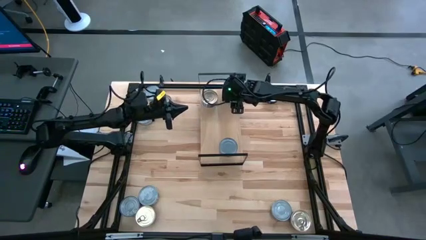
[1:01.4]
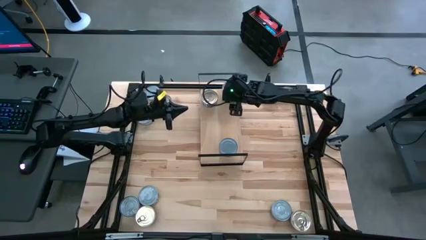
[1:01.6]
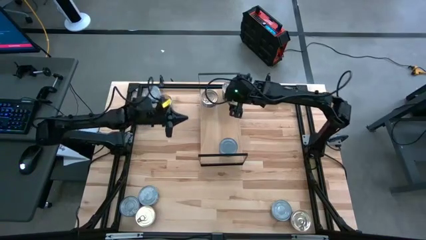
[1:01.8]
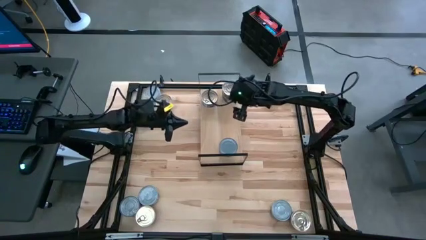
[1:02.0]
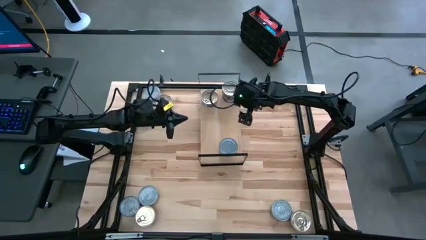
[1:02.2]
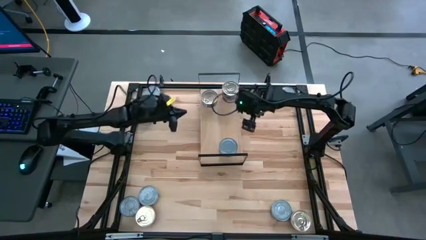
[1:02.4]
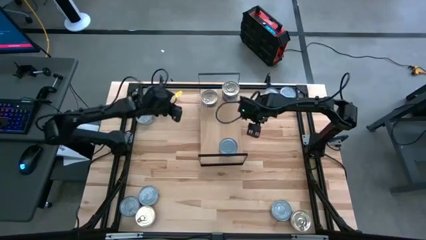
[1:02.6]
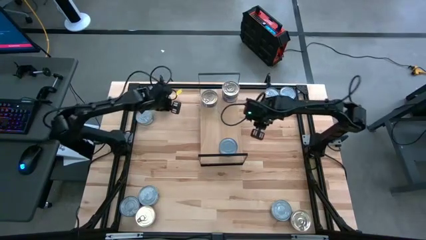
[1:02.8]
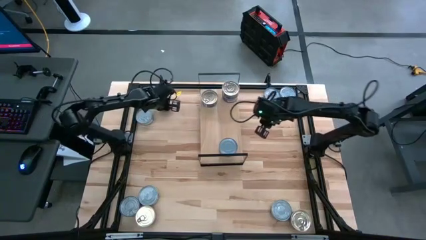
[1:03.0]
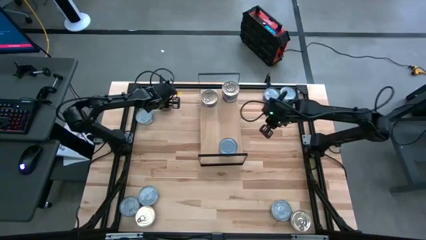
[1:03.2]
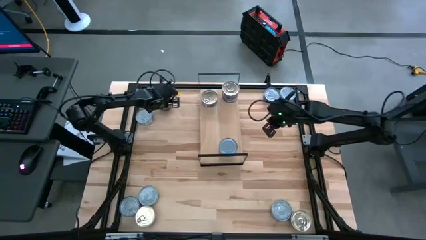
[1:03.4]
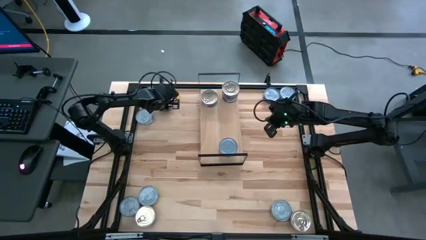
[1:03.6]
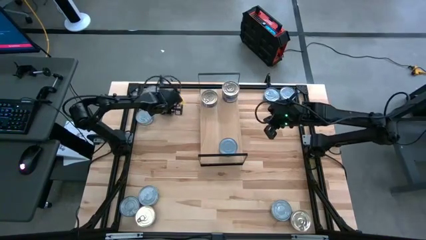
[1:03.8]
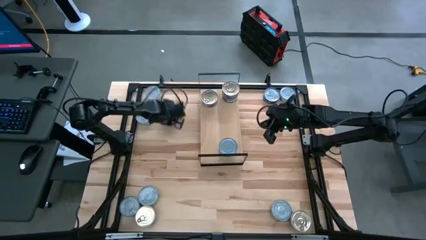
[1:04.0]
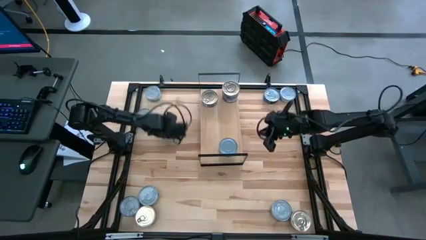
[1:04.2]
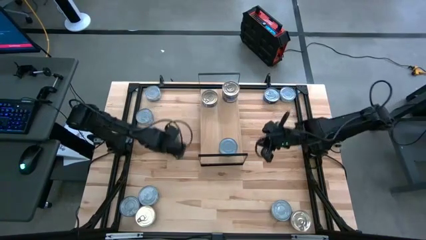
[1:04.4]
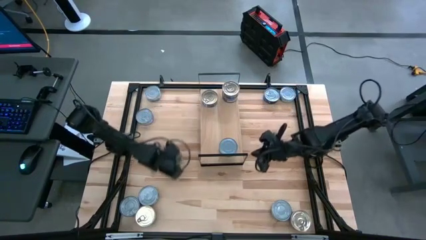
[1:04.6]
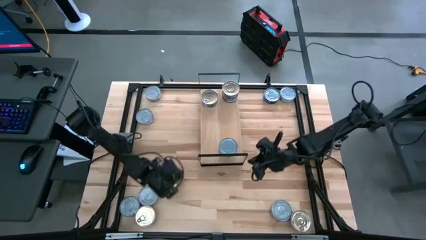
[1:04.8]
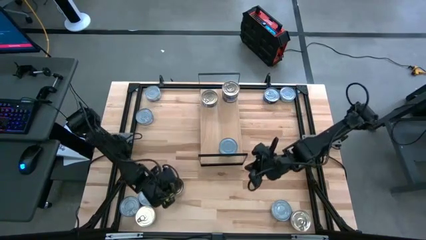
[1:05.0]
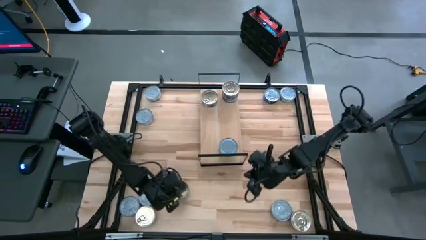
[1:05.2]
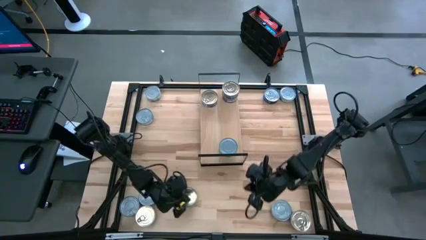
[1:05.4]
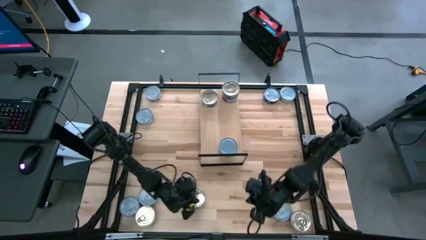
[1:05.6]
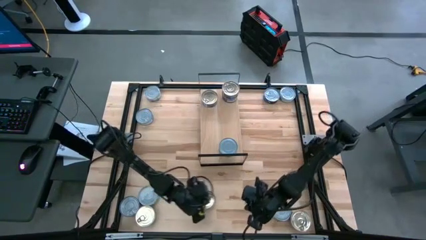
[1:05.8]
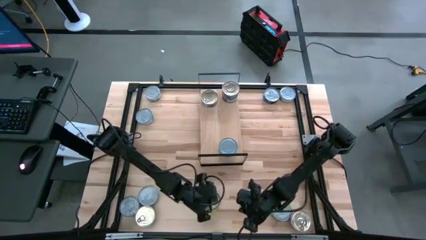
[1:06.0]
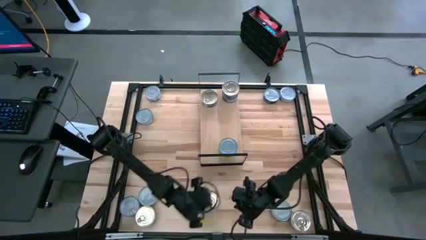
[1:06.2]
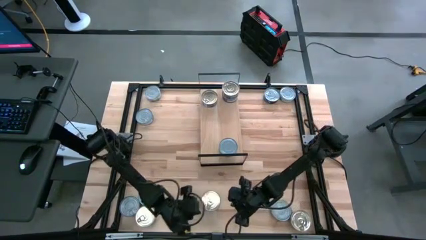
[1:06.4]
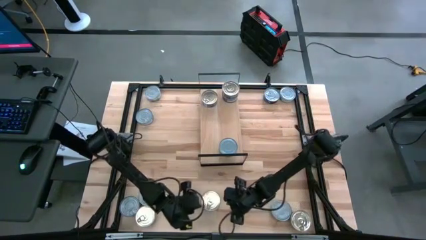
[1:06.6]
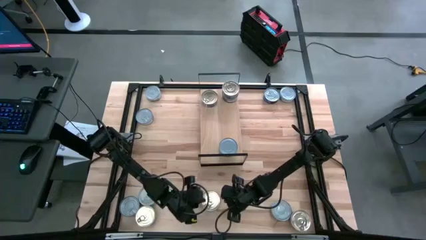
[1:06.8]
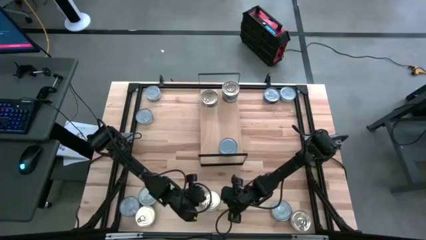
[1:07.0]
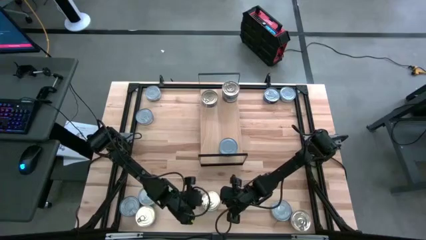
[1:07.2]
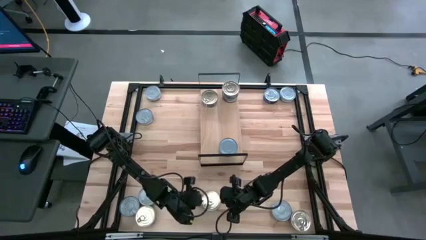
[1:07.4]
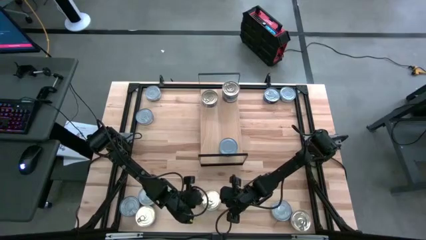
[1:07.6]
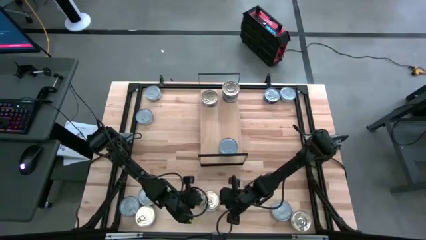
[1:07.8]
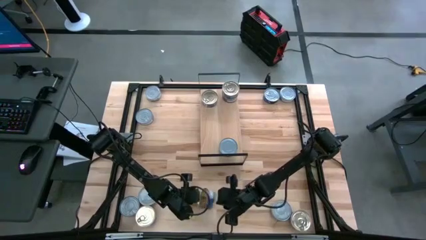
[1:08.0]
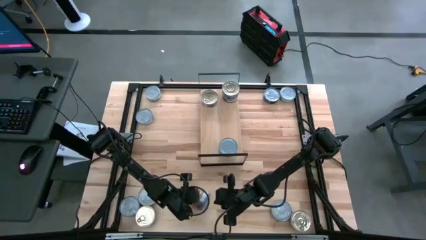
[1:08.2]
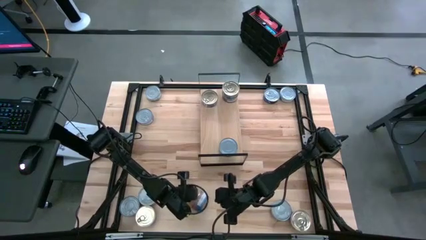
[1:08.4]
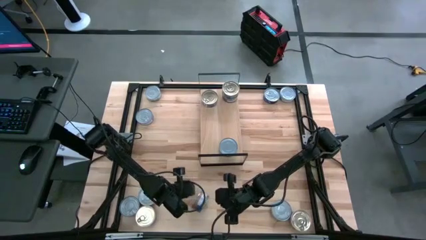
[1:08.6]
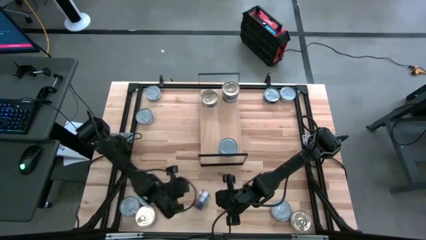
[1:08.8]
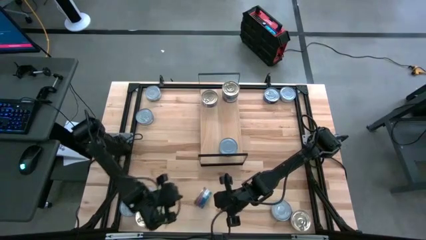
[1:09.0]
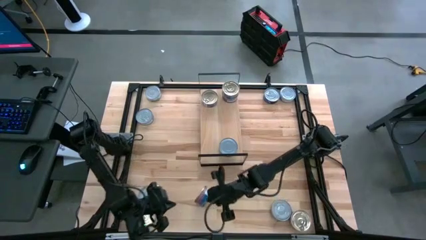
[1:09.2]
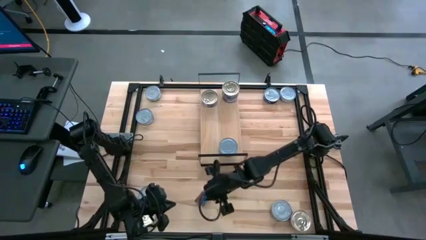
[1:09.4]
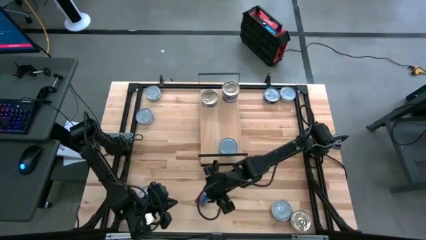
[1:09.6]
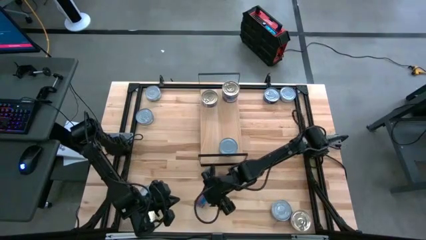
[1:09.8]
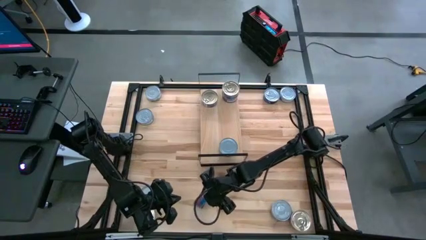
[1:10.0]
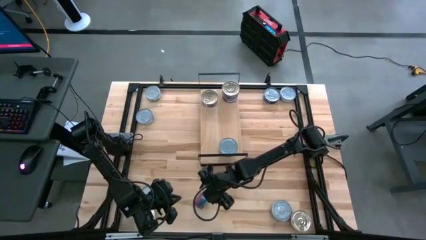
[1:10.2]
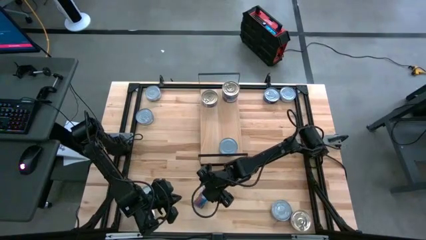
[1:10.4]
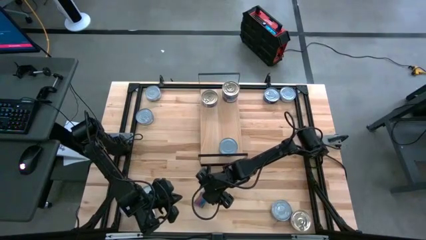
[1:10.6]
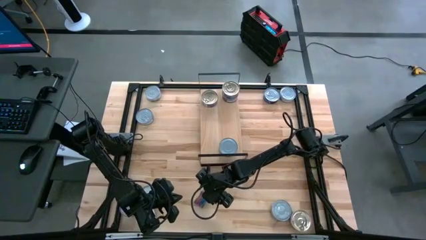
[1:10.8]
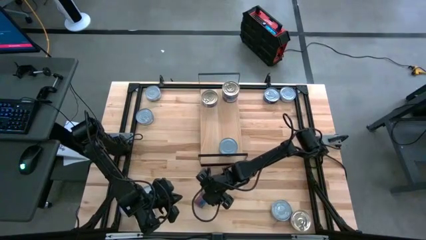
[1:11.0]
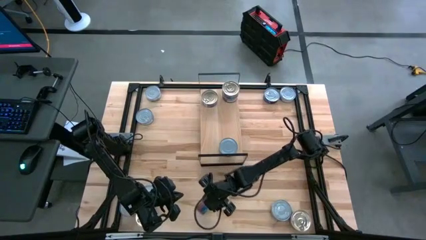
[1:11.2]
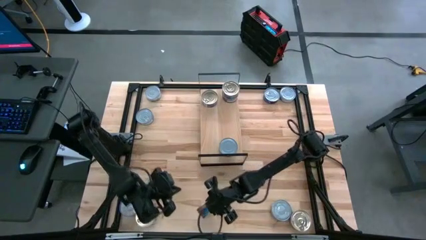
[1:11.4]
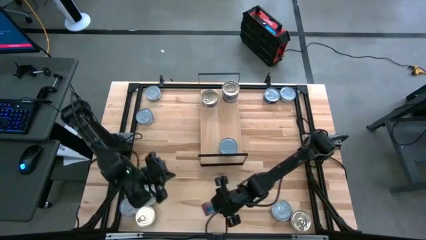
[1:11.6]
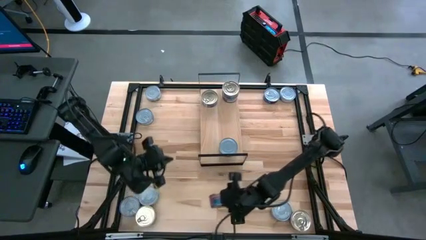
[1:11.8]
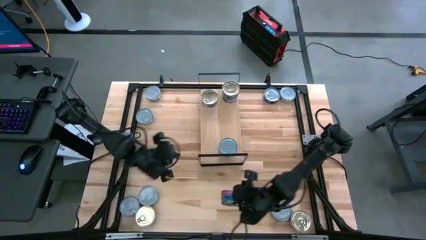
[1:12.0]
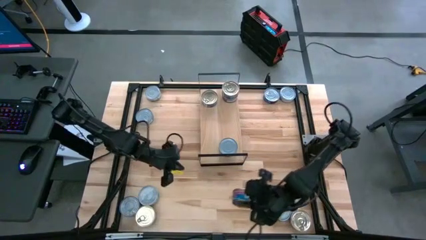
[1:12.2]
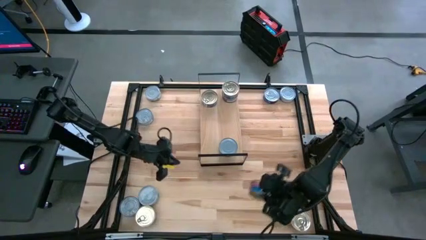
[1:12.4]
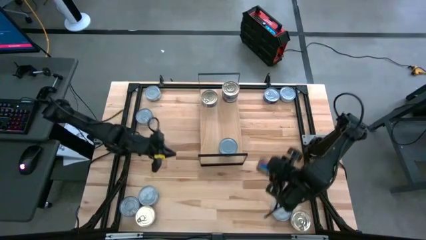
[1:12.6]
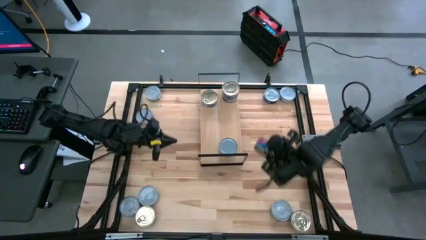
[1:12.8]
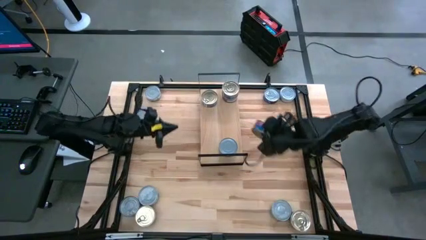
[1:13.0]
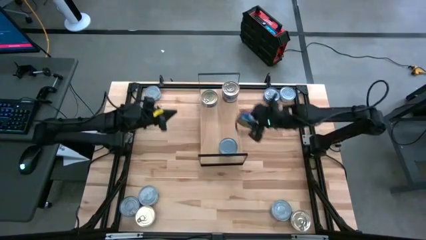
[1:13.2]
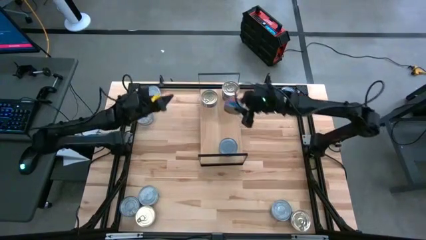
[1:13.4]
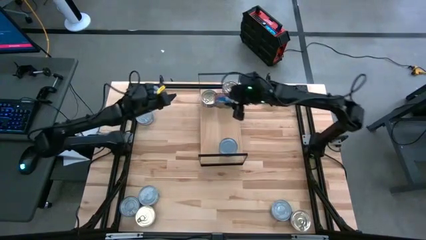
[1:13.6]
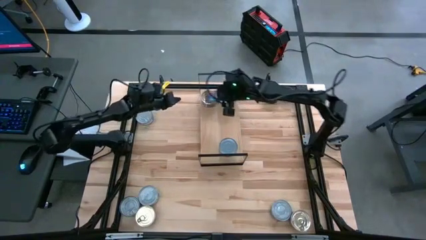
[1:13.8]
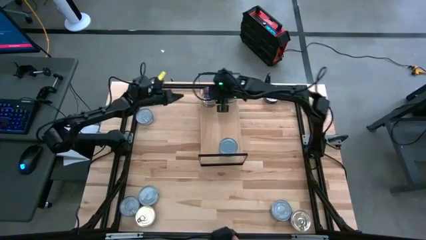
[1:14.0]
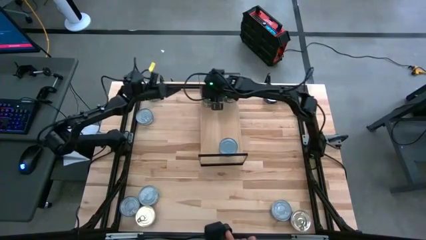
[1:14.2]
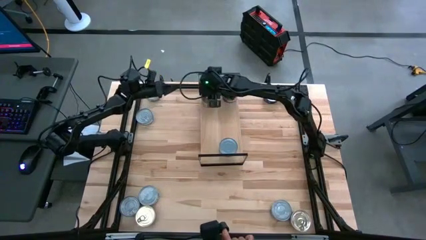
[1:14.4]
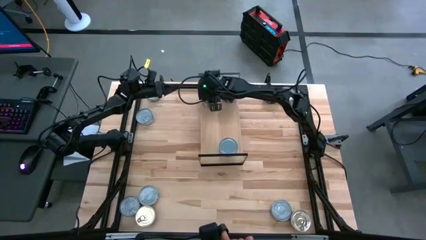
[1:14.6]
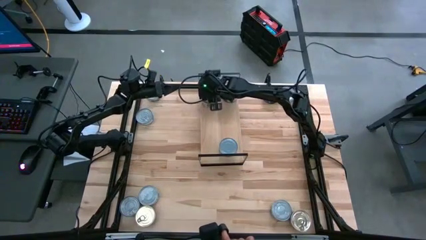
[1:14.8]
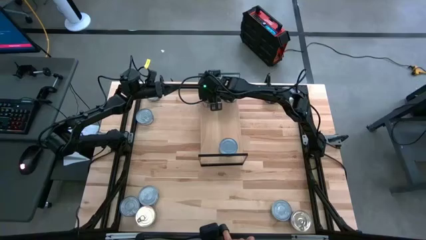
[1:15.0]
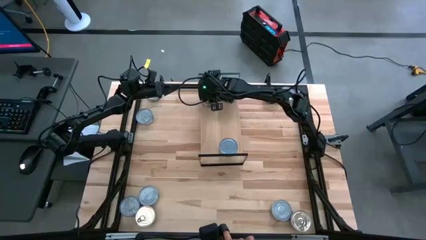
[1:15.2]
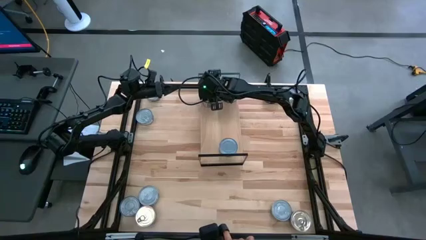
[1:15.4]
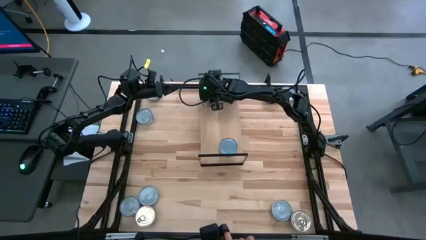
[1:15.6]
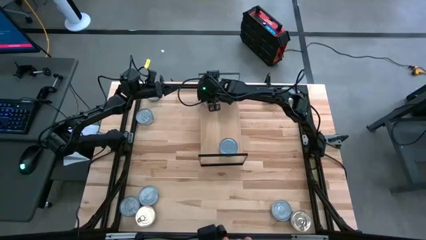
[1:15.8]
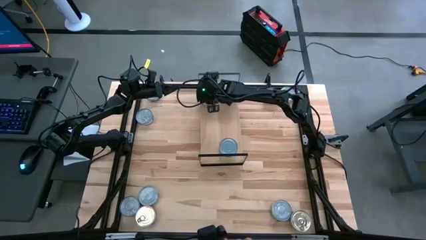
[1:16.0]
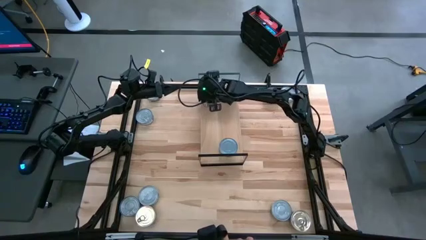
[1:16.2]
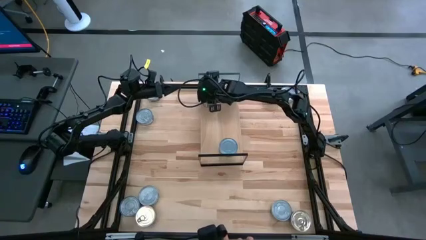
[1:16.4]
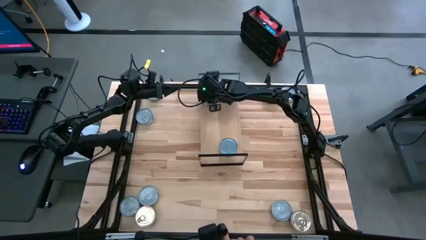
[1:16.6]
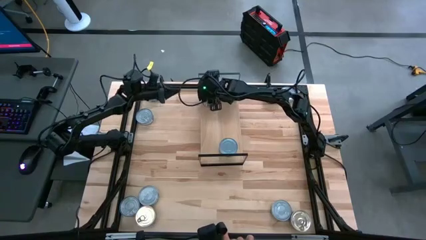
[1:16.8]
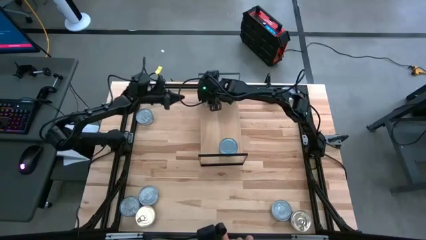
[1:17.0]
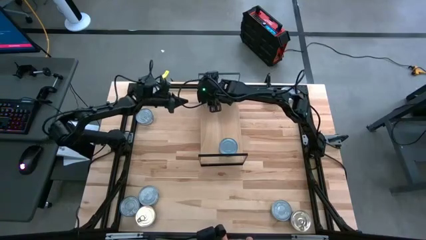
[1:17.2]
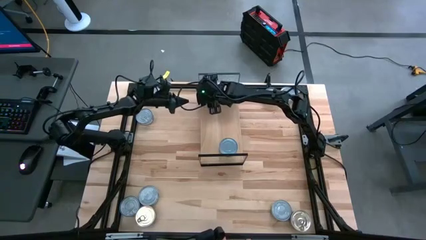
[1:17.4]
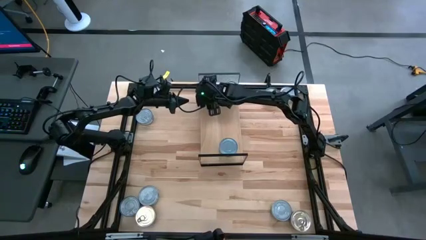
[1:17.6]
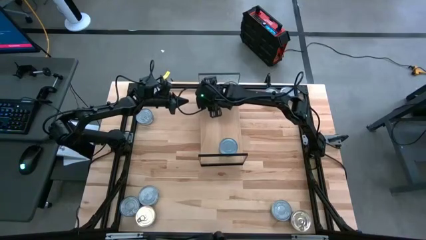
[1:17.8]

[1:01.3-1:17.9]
Task: Stack canned seafood by type on shelf
Stack the blue pink tuna can on top of the other blue pink tuna can on the shelf
